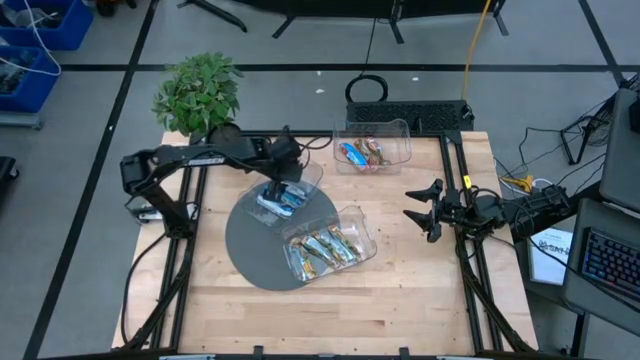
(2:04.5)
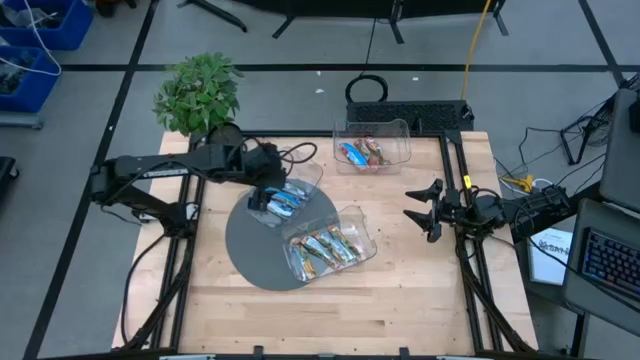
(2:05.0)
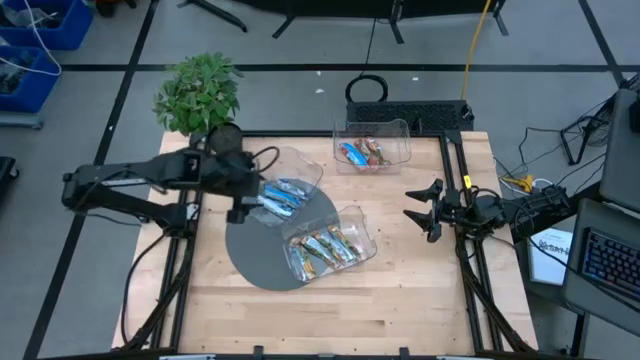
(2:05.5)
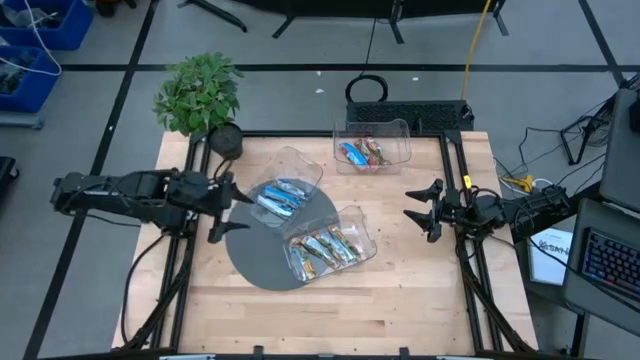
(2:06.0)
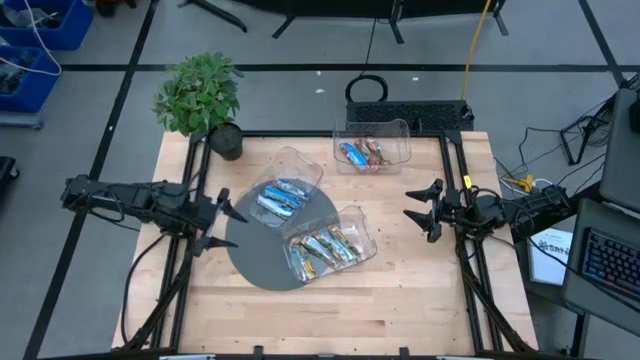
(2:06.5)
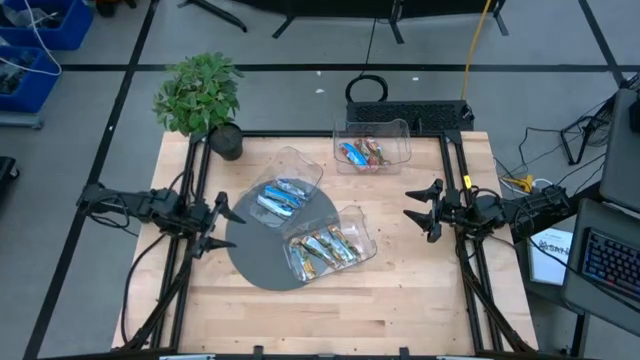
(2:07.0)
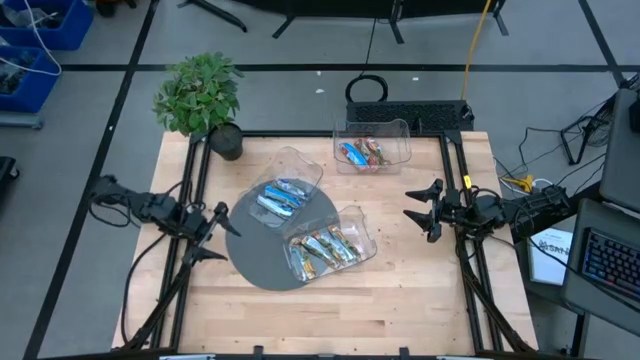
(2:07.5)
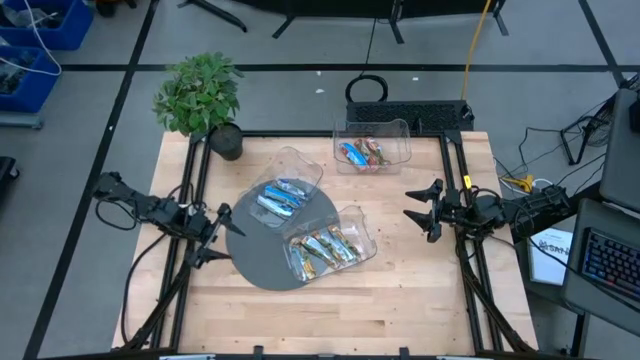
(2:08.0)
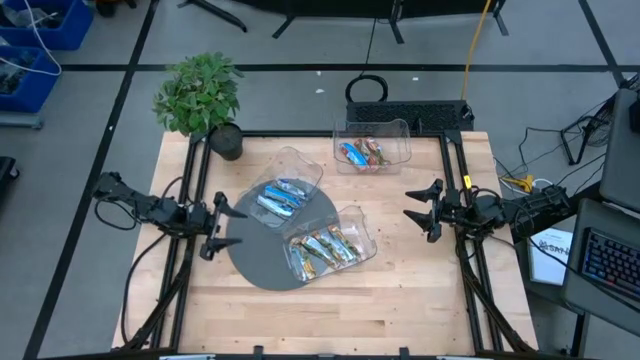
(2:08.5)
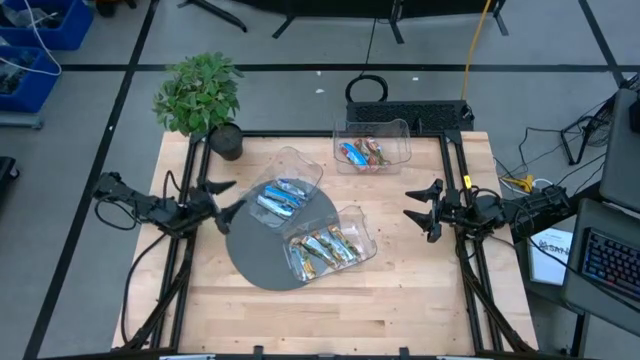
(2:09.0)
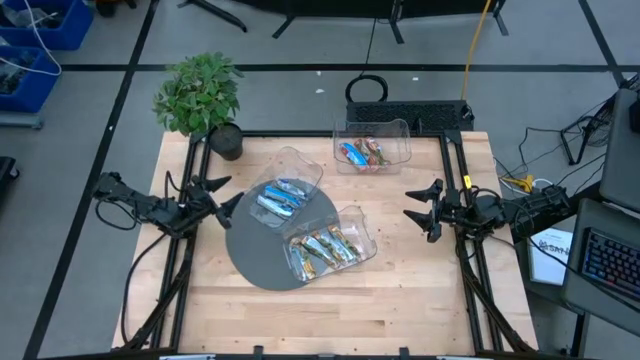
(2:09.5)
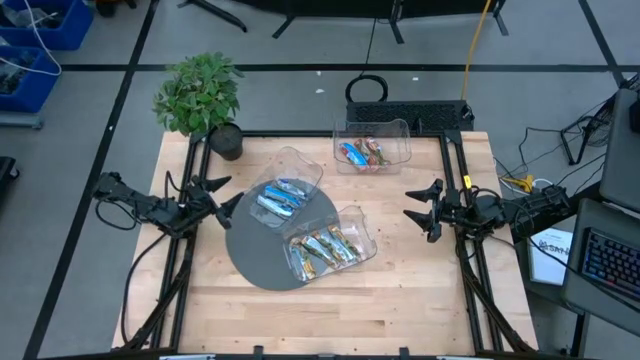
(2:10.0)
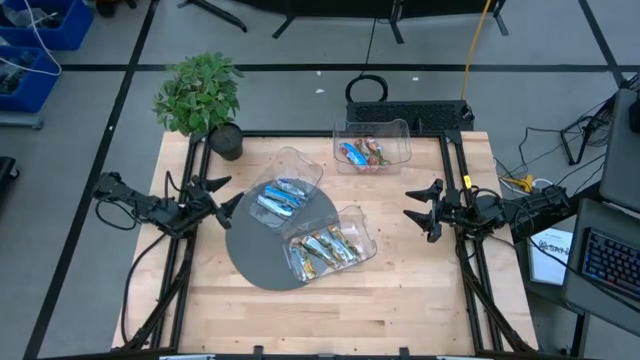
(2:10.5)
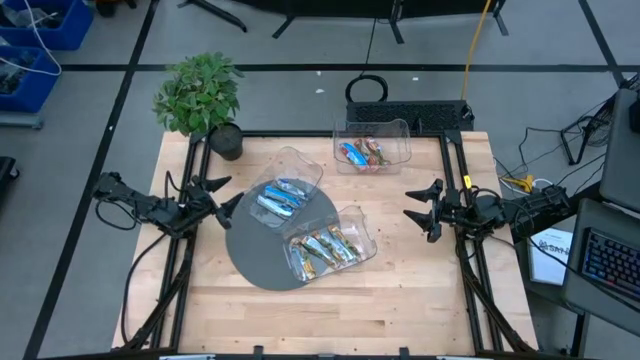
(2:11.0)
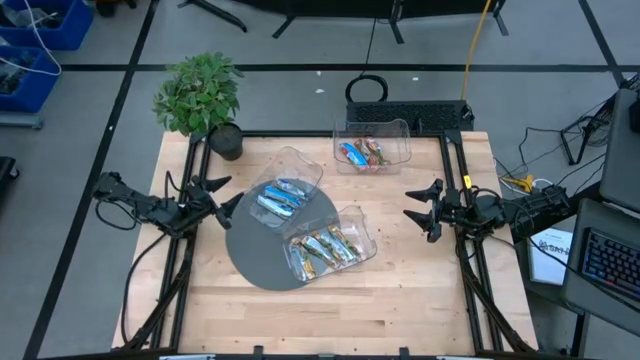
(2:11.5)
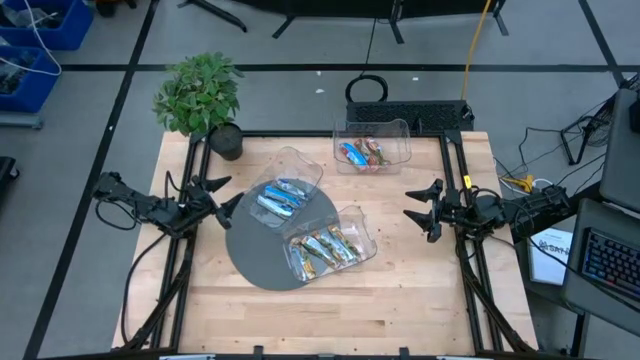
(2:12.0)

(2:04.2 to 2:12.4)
Task: Pick and place Granola Bars by type
Return to Home Position

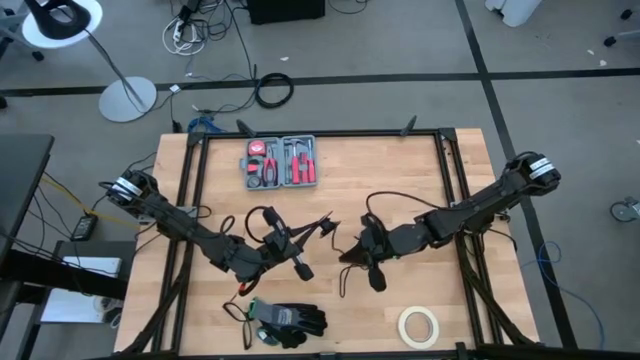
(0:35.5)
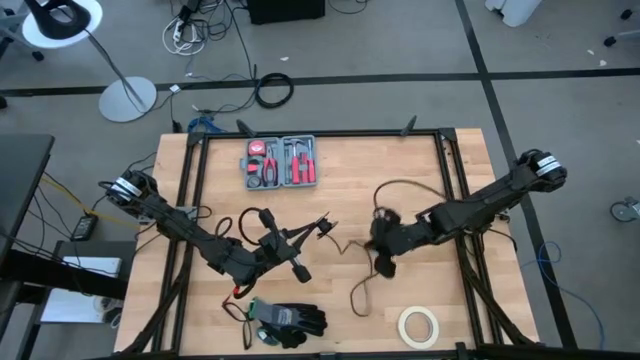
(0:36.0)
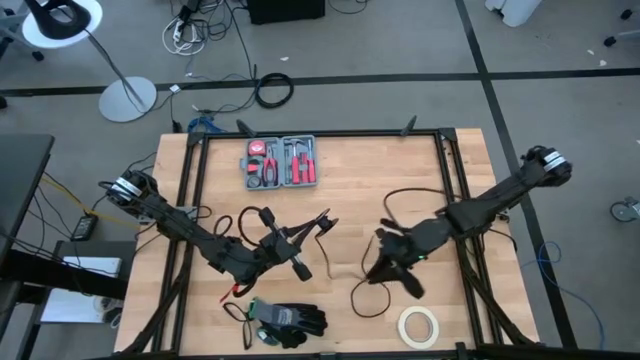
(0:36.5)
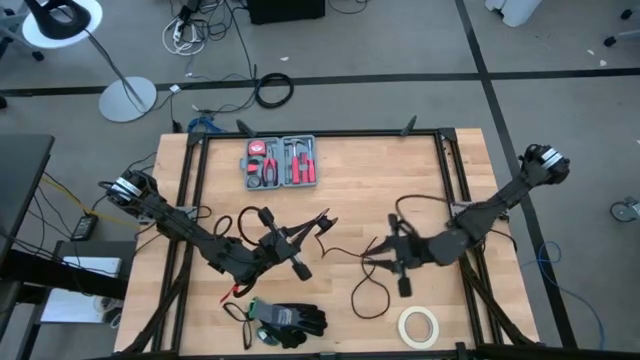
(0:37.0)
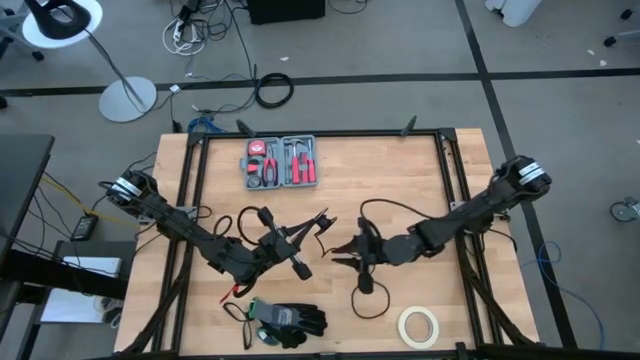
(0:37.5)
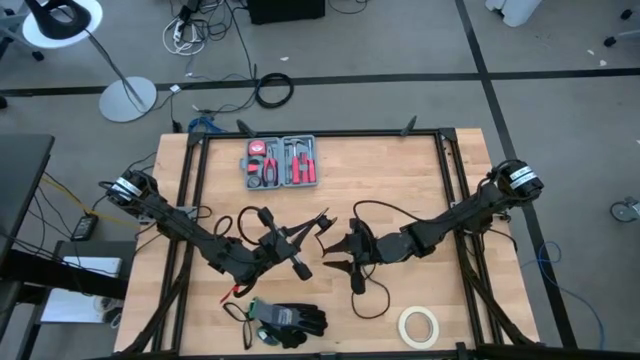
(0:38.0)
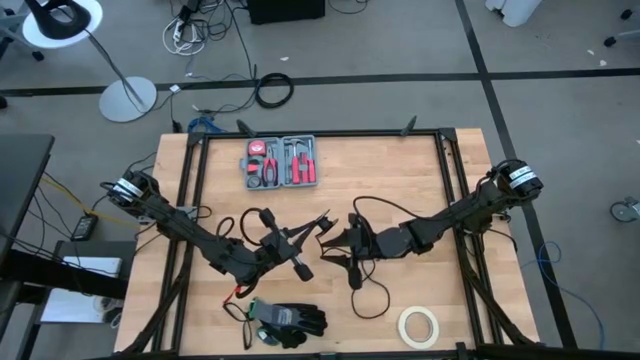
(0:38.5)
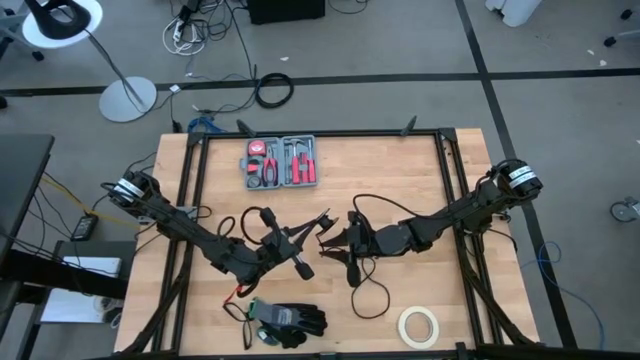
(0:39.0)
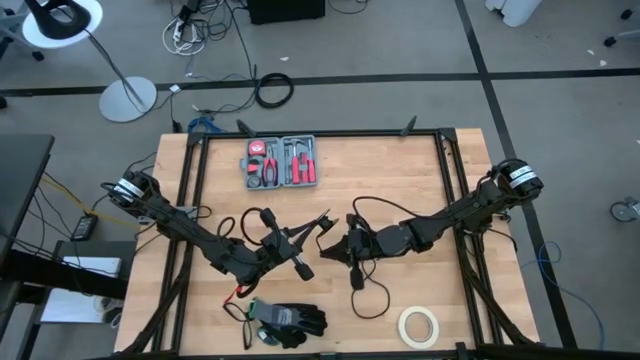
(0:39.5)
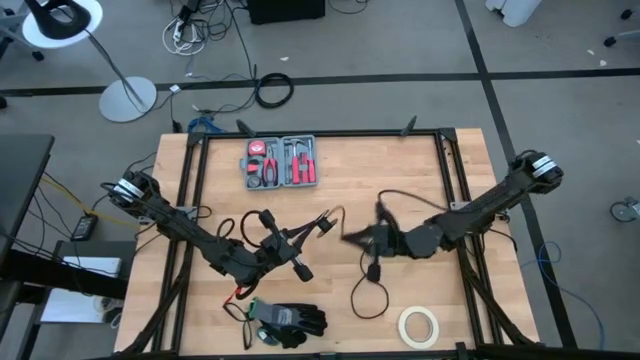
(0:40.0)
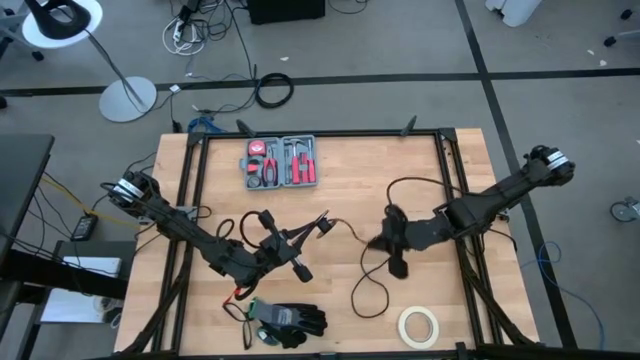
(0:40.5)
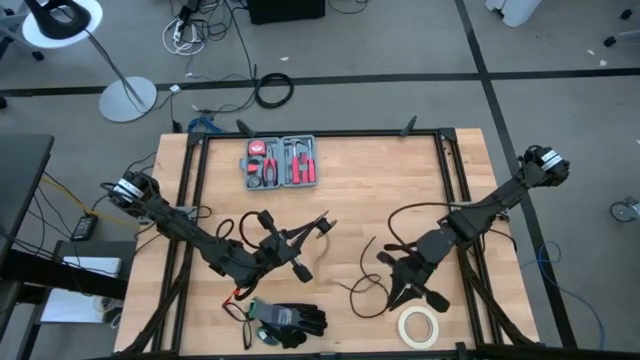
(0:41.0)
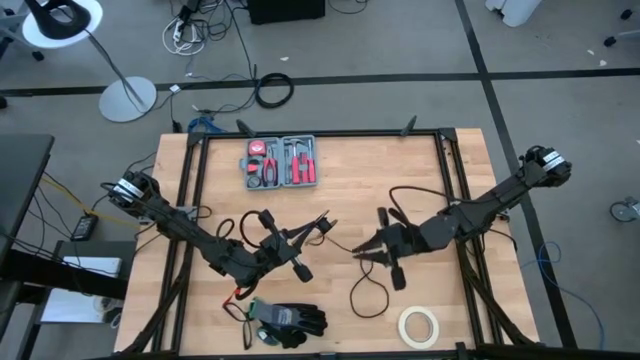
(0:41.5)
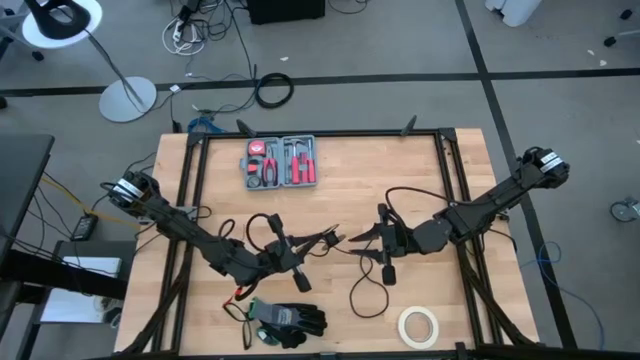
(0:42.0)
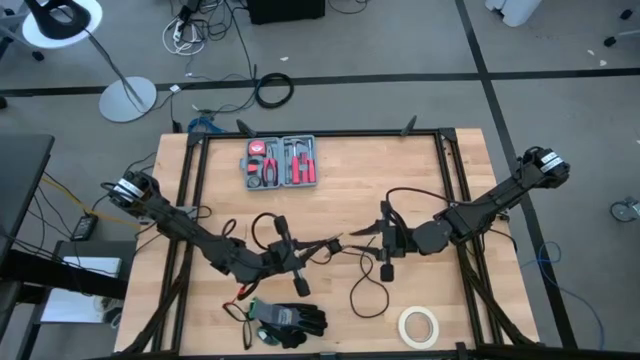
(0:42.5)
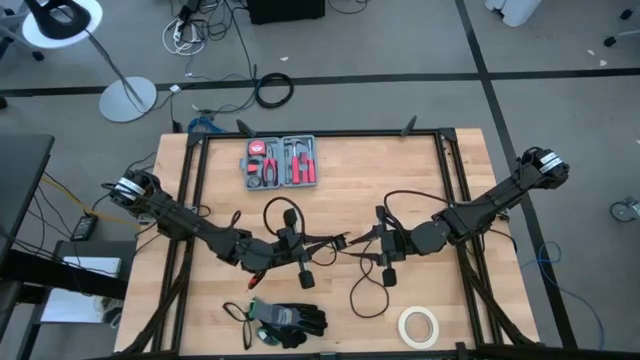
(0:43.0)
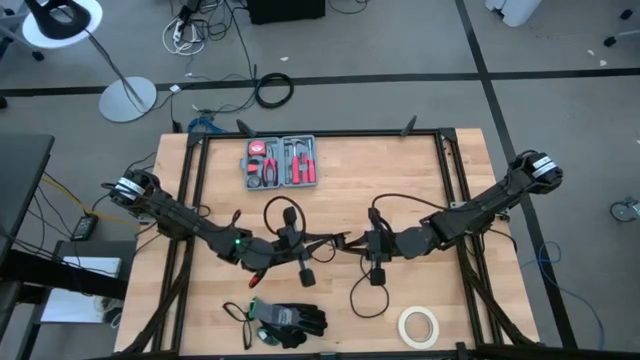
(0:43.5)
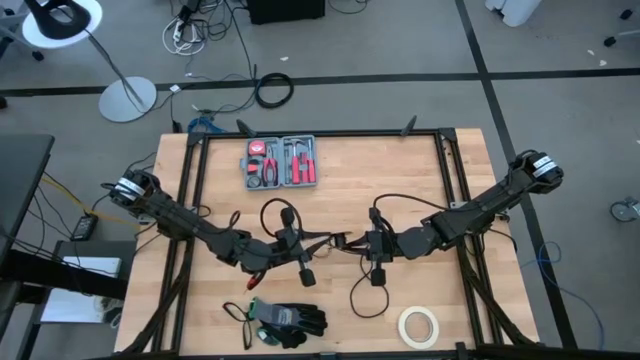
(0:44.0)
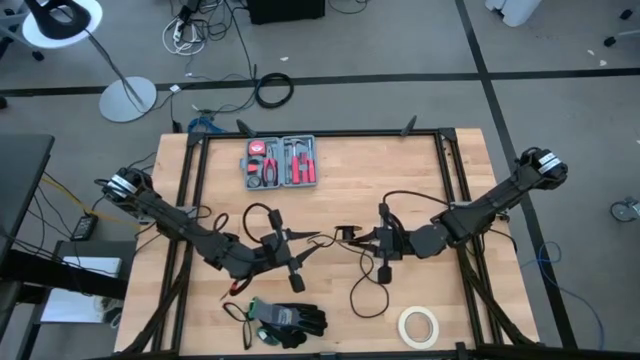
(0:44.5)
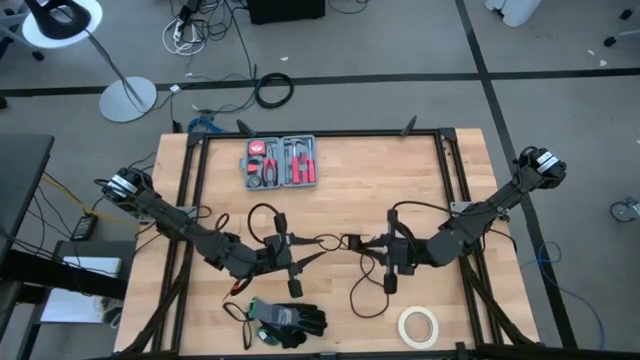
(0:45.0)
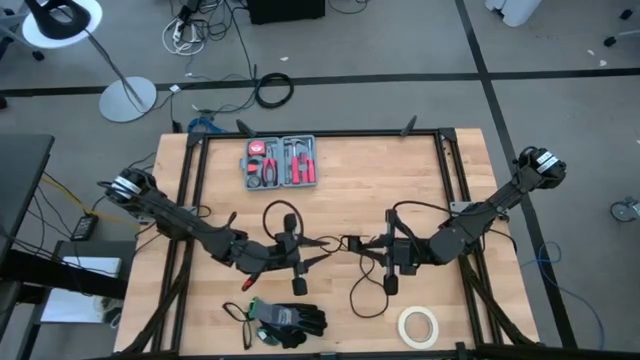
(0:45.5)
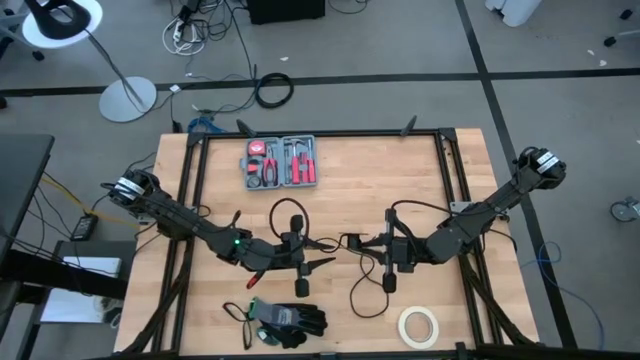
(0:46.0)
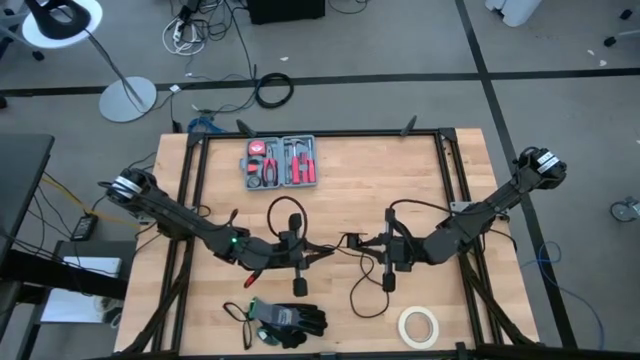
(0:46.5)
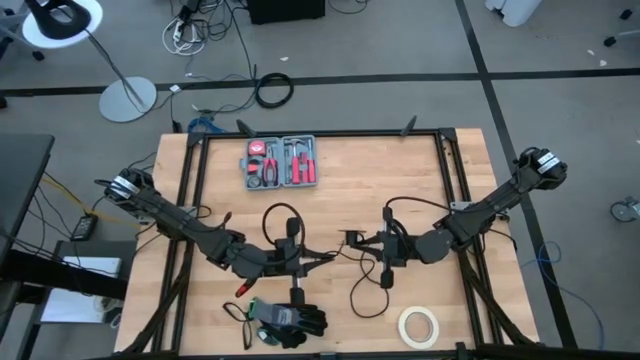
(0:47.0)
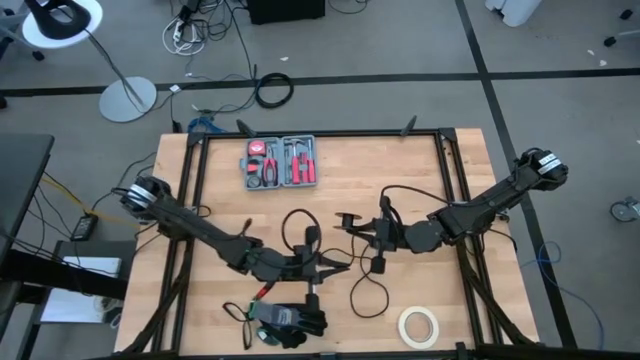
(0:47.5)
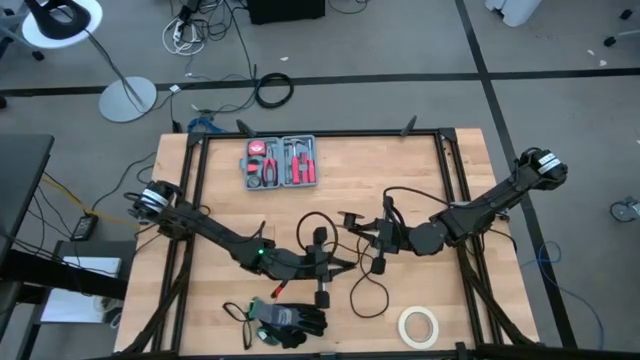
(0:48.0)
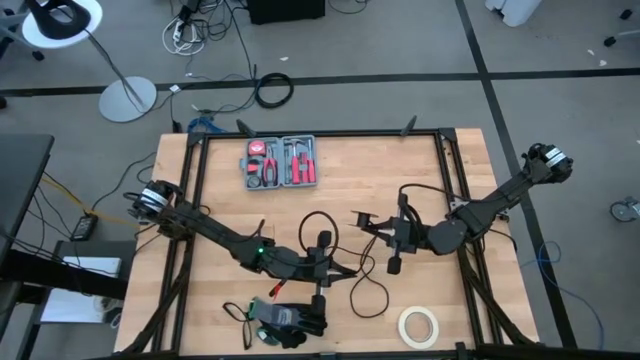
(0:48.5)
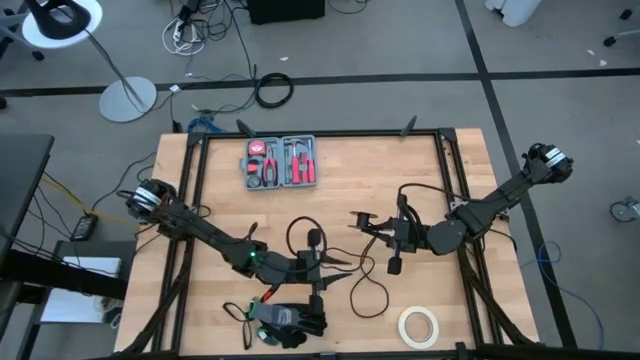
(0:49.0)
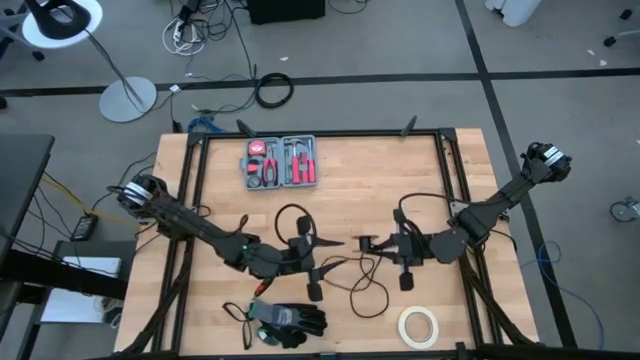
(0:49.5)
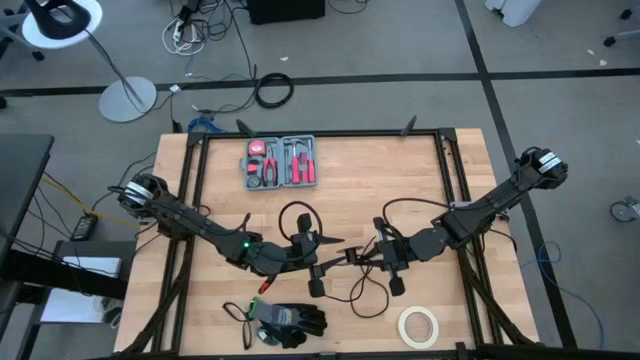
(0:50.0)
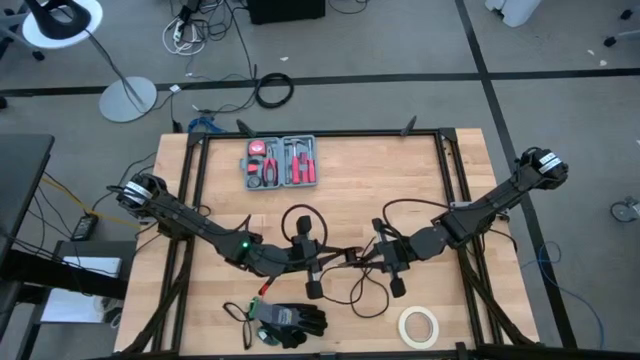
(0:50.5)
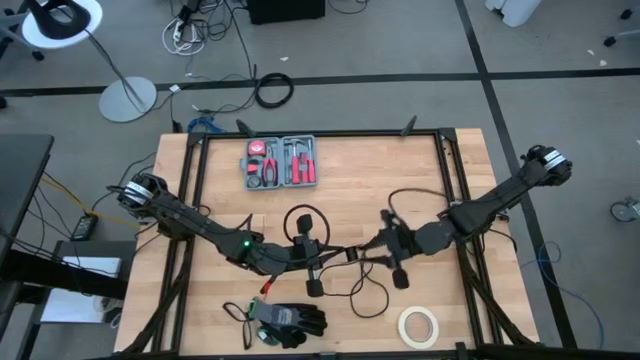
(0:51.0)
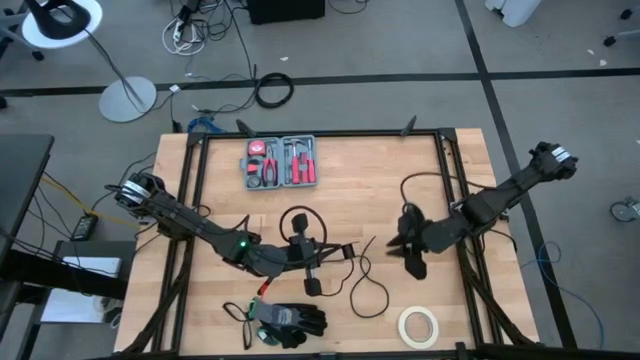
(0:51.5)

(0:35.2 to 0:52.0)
Task: Coil cords
Uncoil the black wire cable from the black spool
